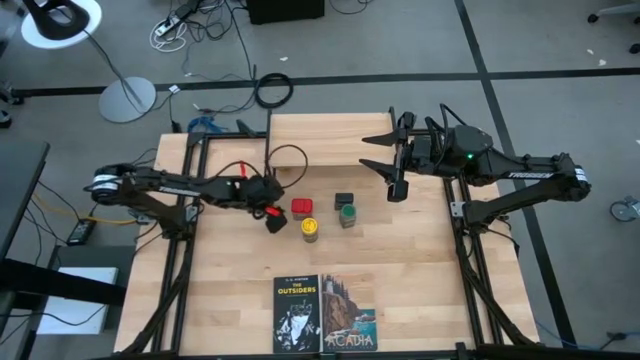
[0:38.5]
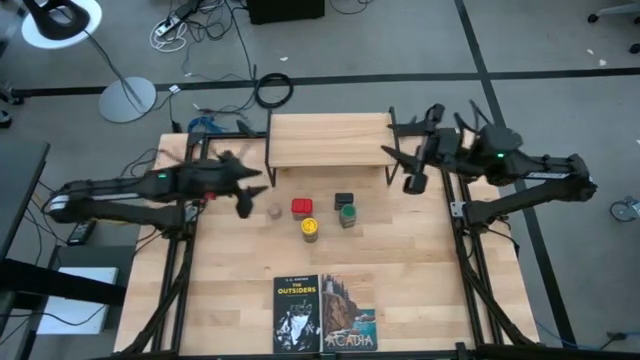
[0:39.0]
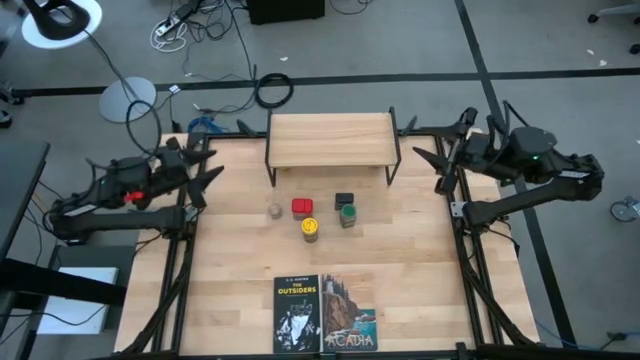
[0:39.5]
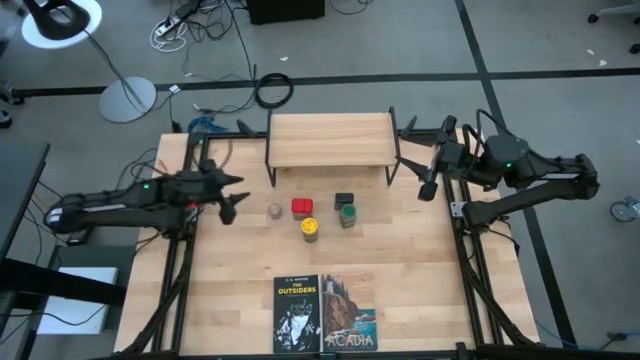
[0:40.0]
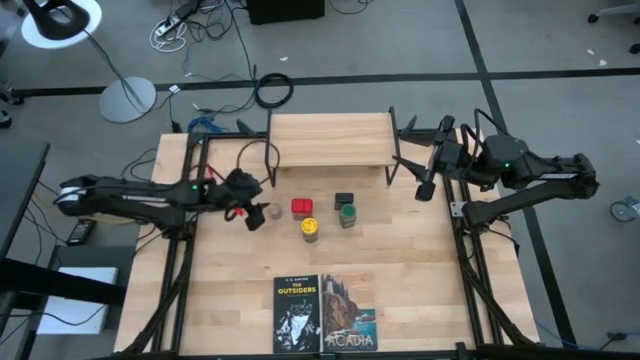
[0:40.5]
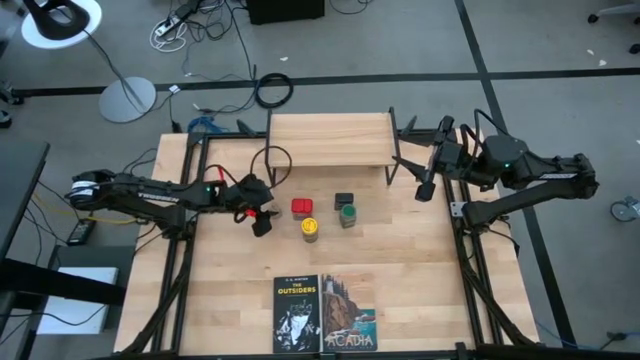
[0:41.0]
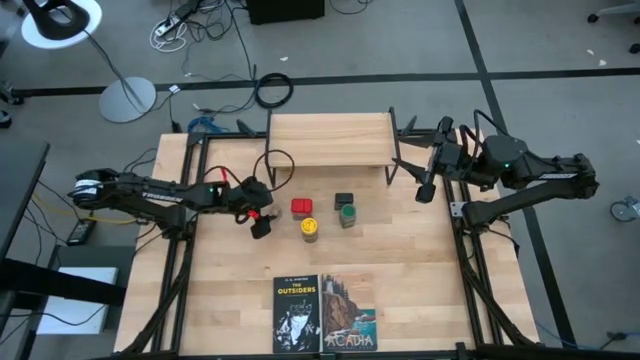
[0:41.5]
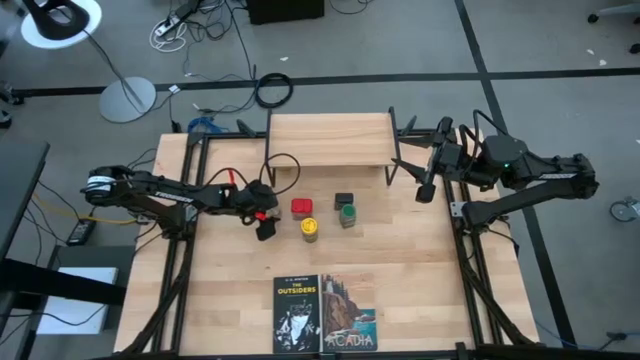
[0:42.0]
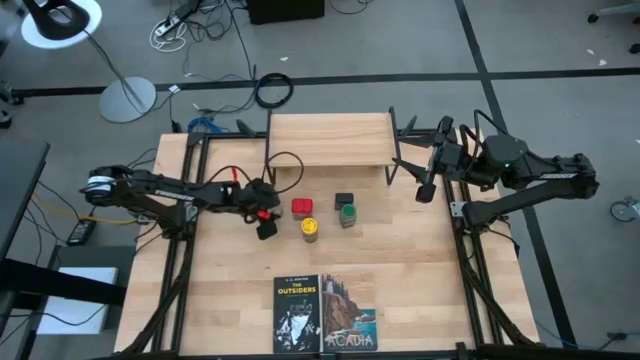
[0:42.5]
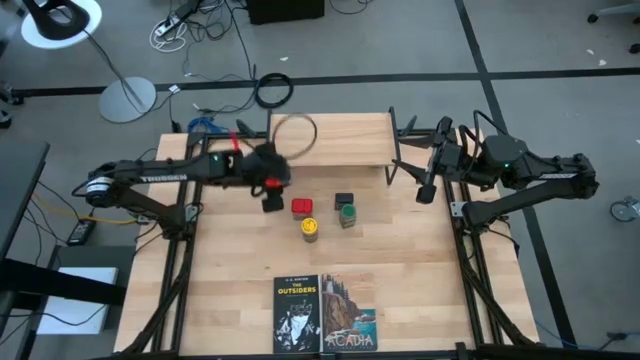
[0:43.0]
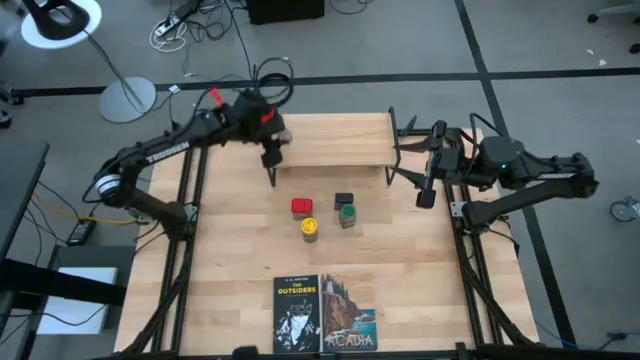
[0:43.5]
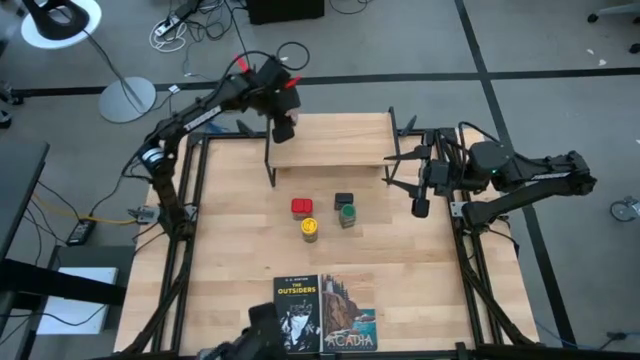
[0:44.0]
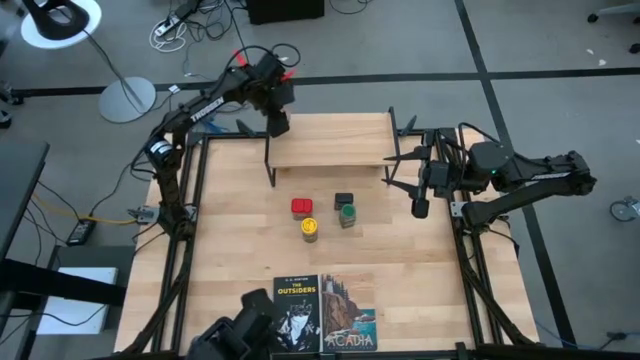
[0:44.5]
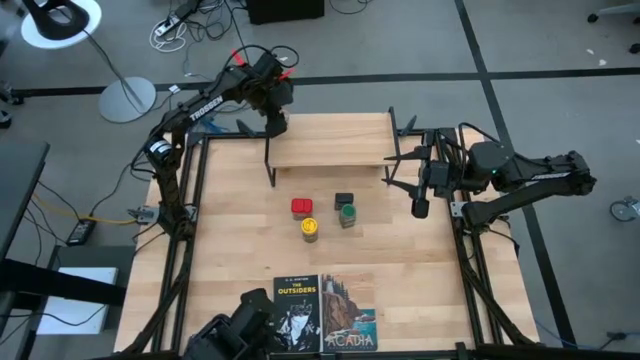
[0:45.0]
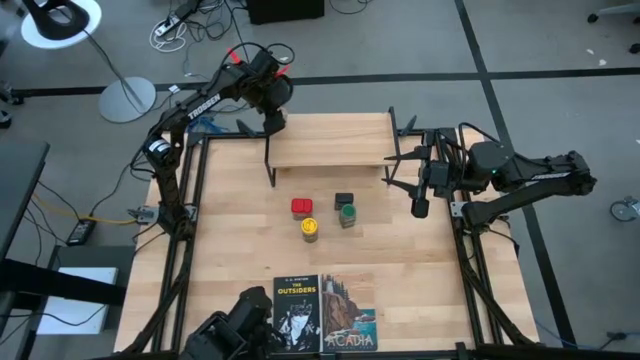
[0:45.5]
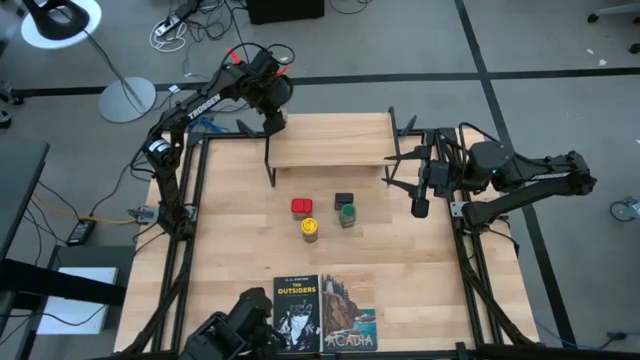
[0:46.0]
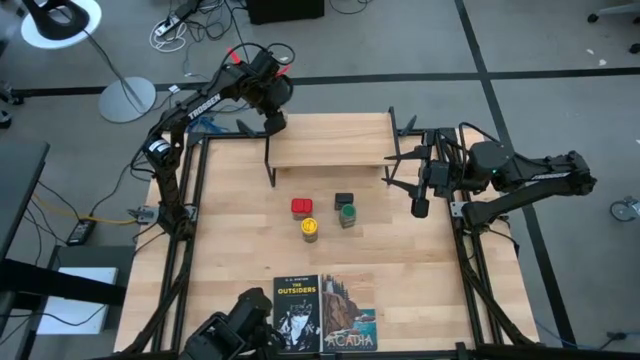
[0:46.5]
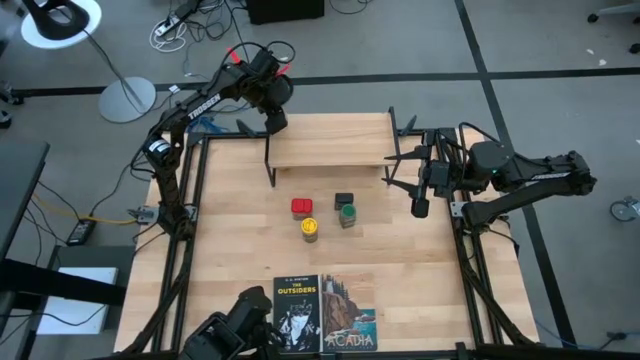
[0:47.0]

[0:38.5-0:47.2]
Task: Shelf spices
Put the brown seasoning bottle on the shelf

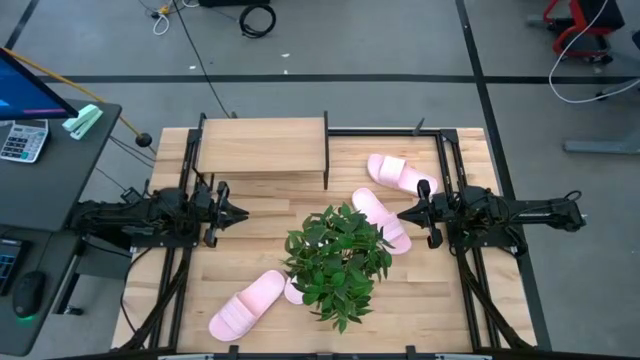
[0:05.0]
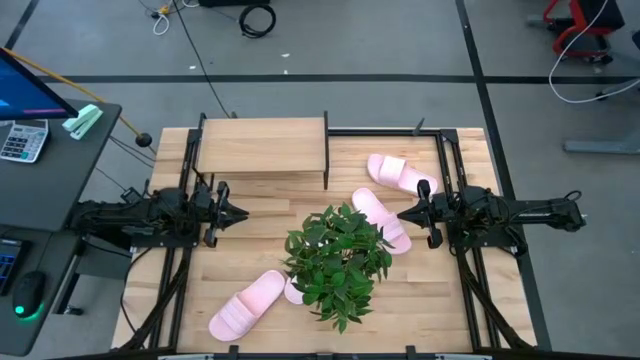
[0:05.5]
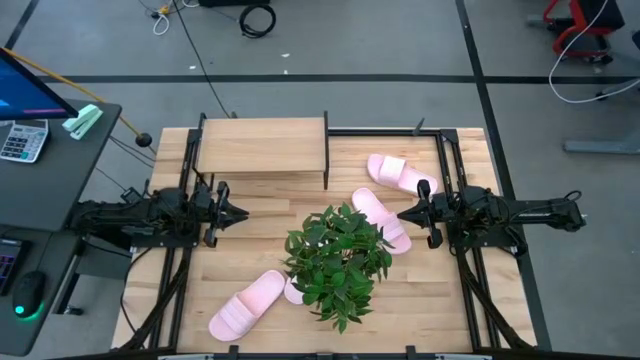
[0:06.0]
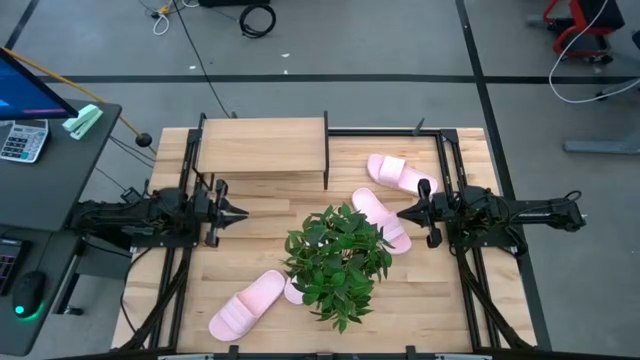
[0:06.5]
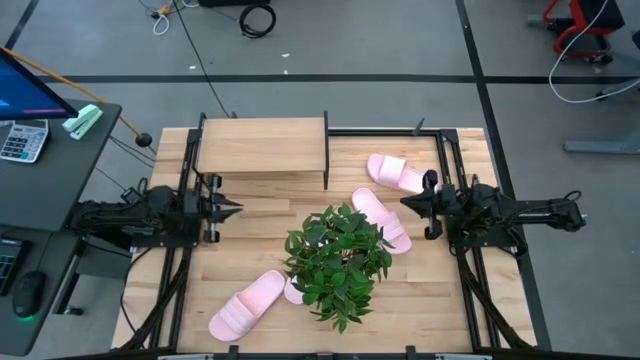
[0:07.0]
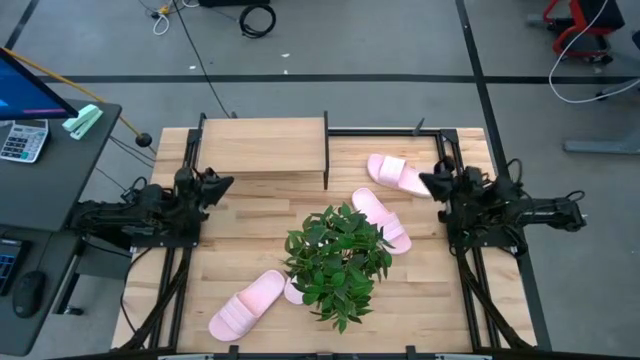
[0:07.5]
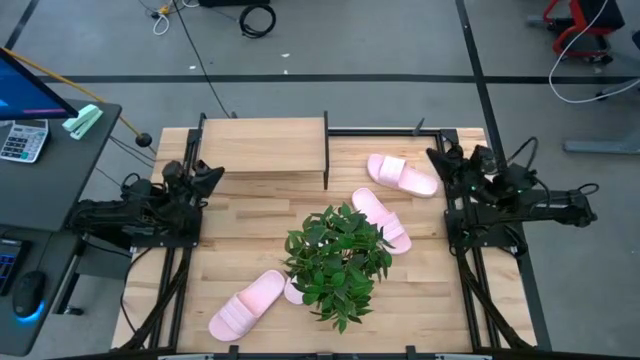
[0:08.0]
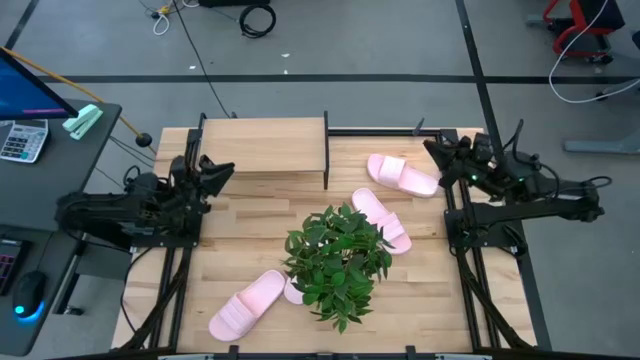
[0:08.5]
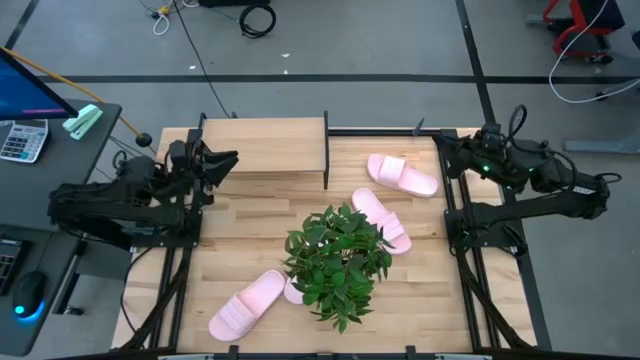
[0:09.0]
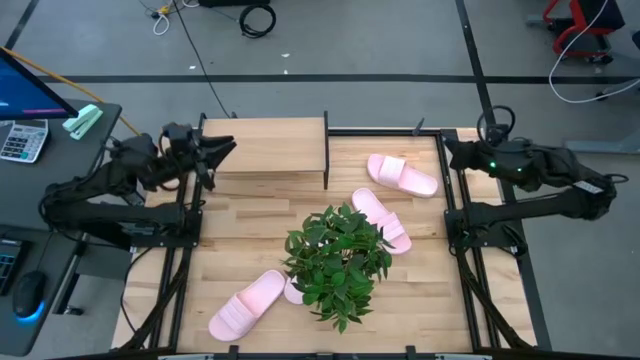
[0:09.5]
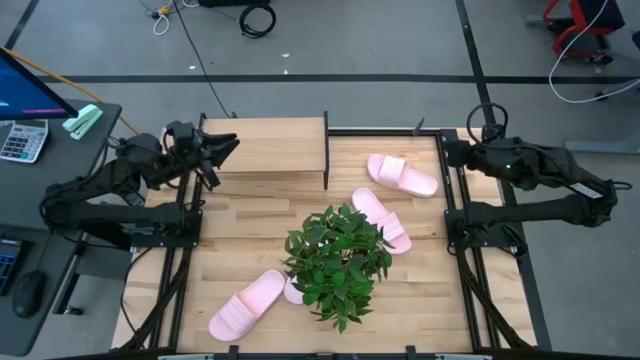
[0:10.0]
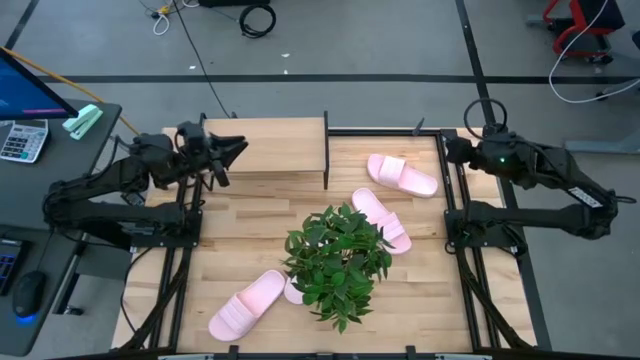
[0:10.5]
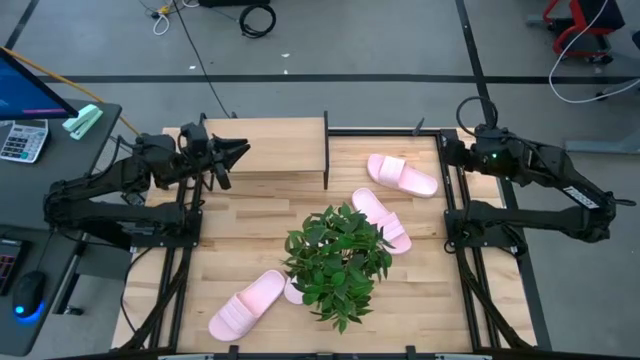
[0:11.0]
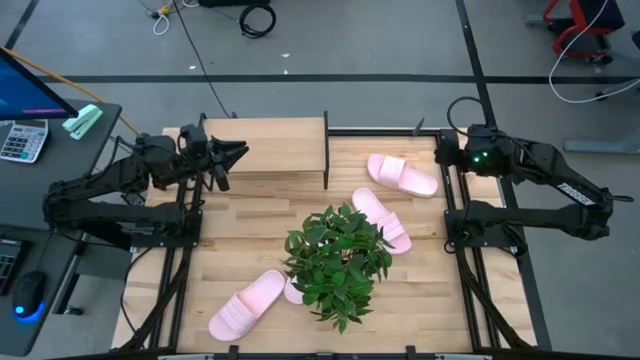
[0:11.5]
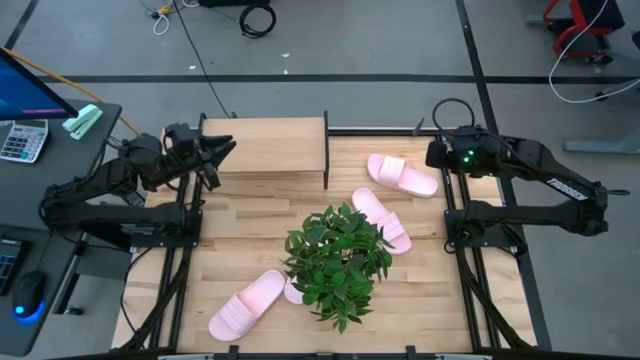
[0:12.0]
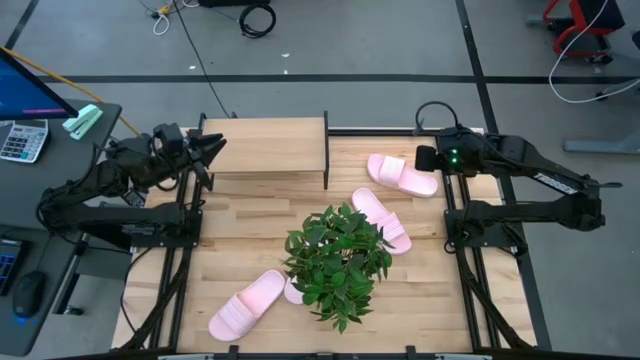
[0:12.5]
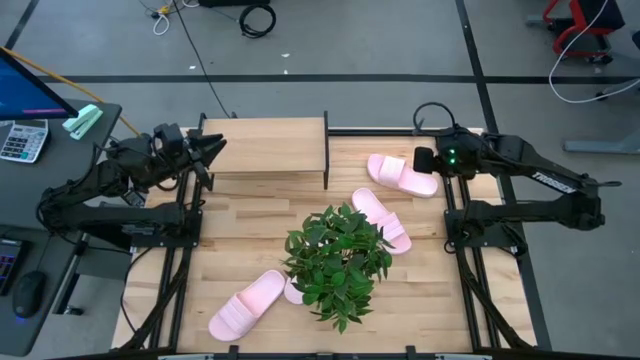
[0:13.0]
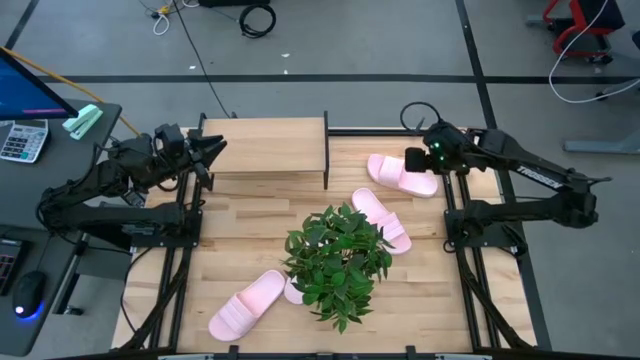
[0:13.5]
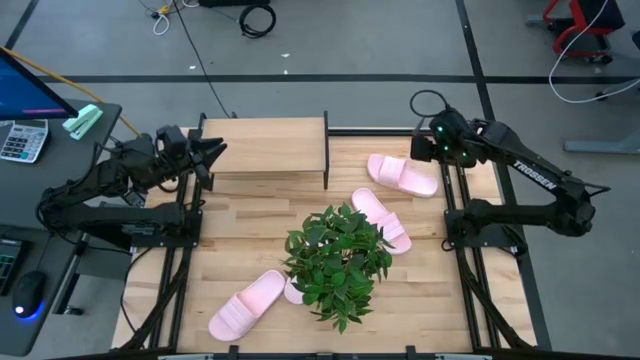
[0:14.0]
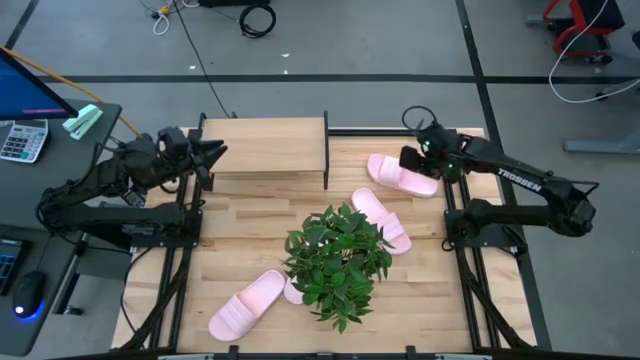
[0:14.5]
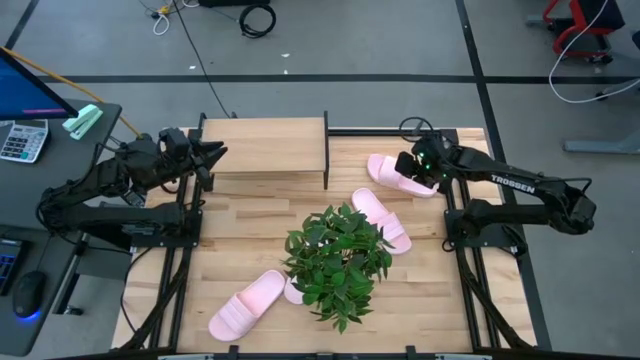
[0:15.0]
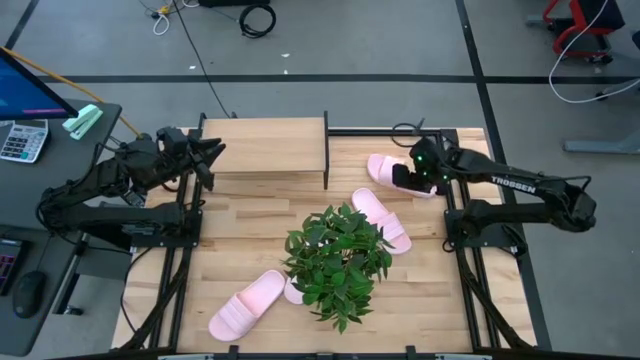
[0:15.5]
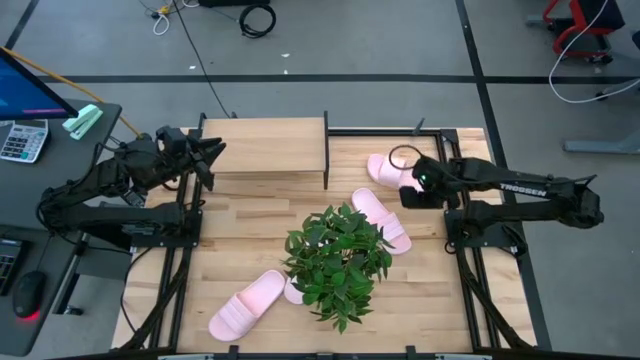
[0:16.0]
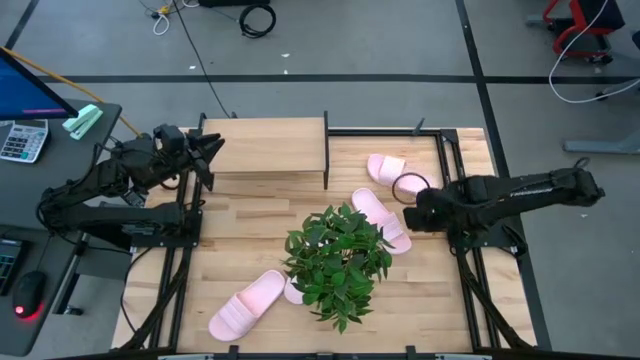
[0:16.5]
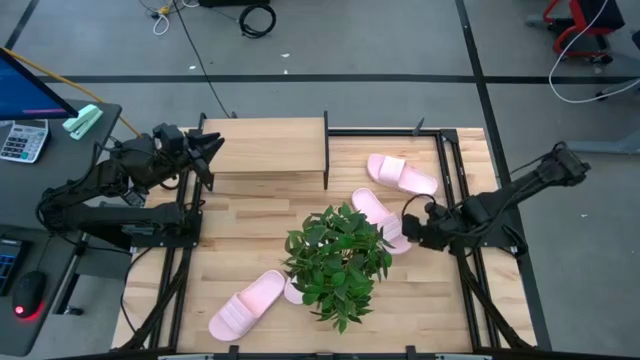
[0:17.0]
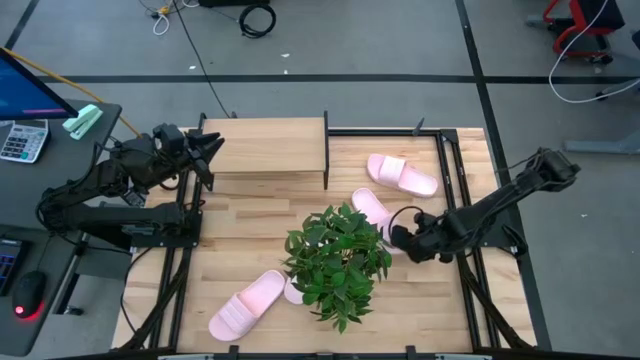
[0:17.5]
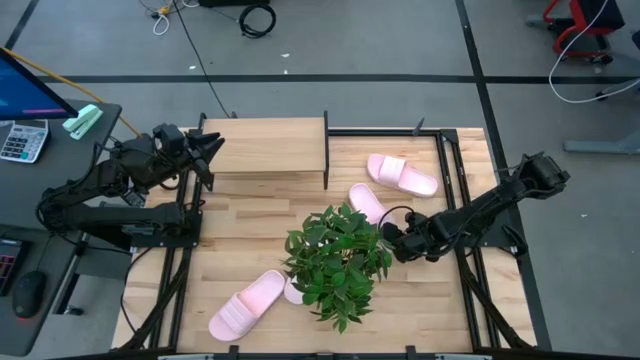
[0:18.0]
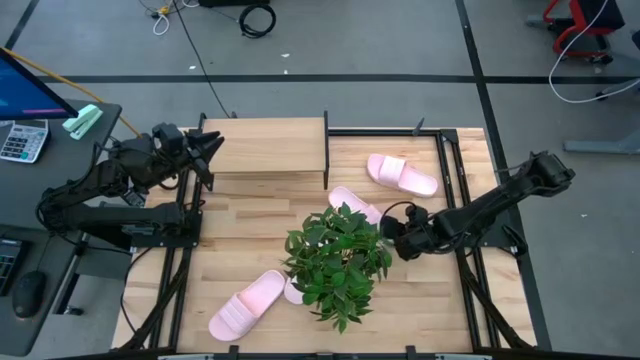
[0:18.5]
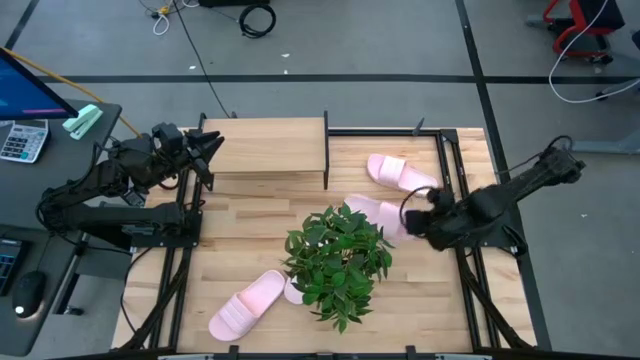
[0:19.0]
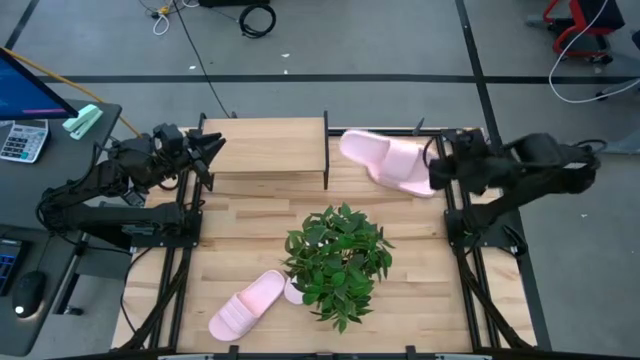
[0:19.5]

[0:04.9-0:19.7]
Task: Pick and place slides into the shelf
Put the pink slide on the shelf
